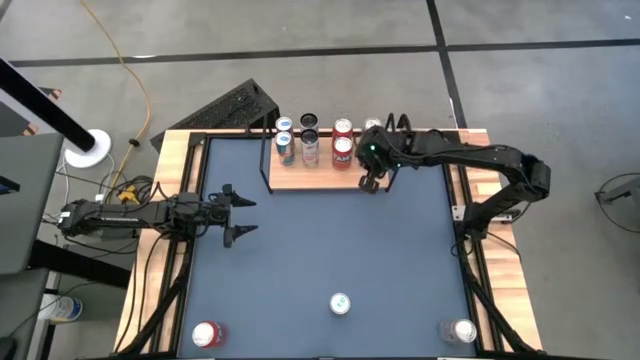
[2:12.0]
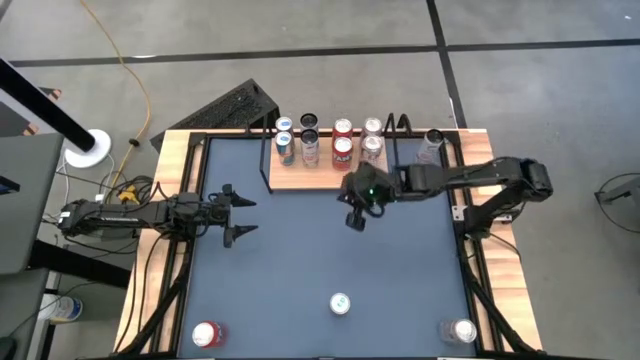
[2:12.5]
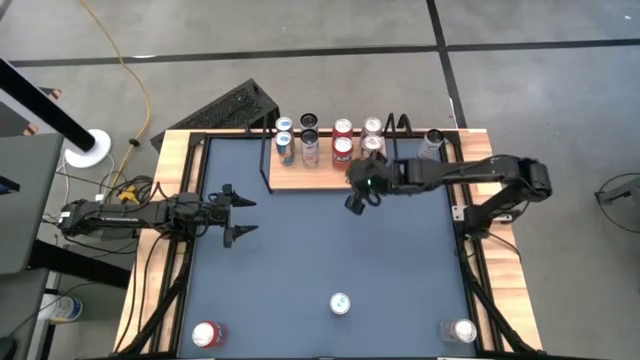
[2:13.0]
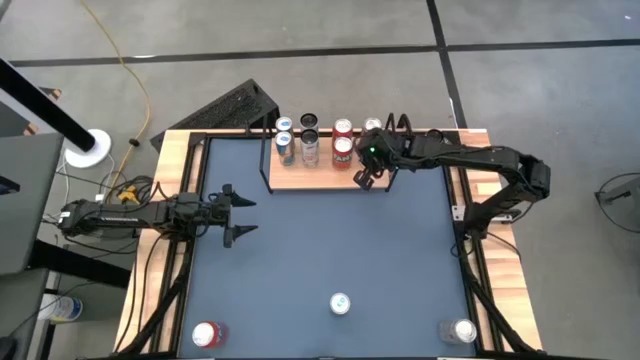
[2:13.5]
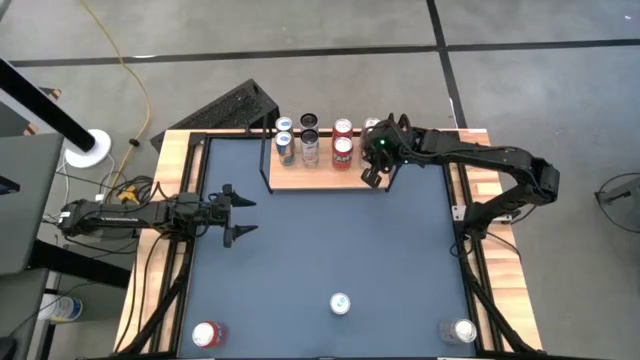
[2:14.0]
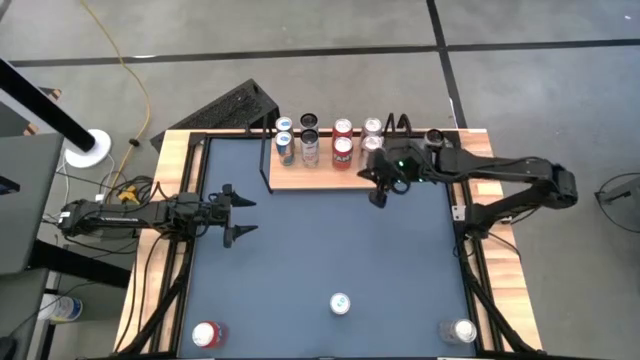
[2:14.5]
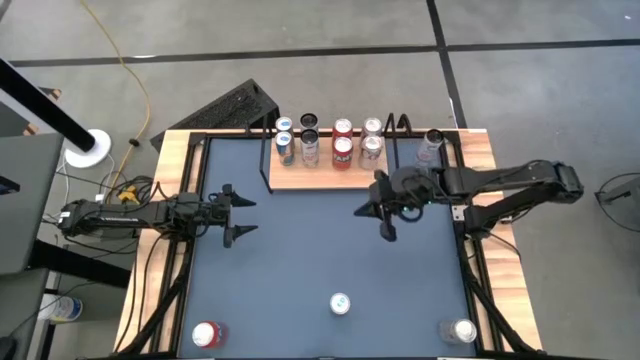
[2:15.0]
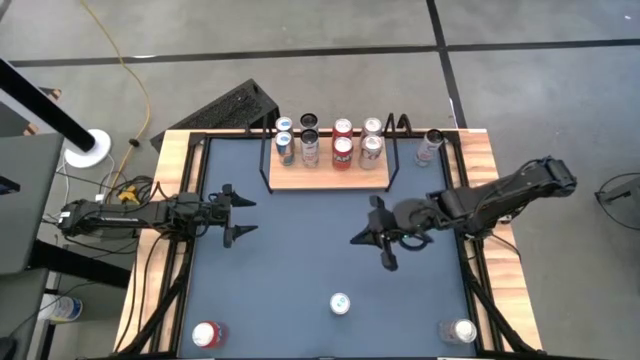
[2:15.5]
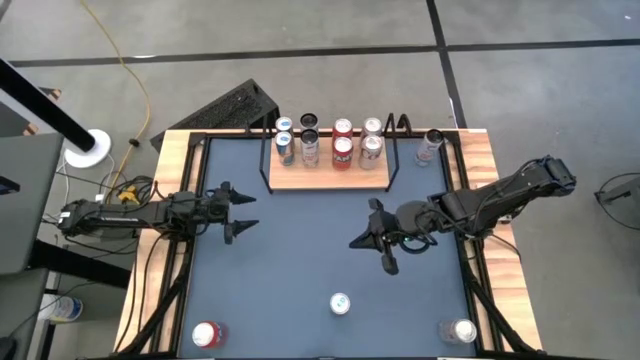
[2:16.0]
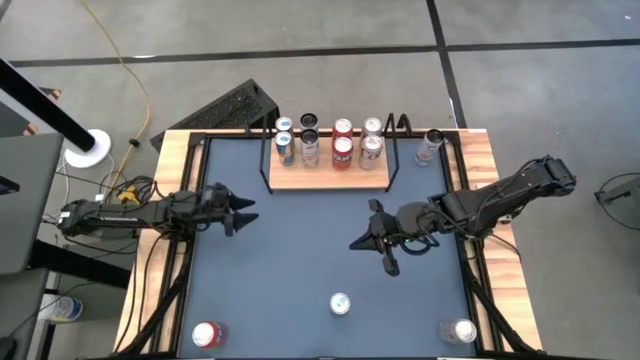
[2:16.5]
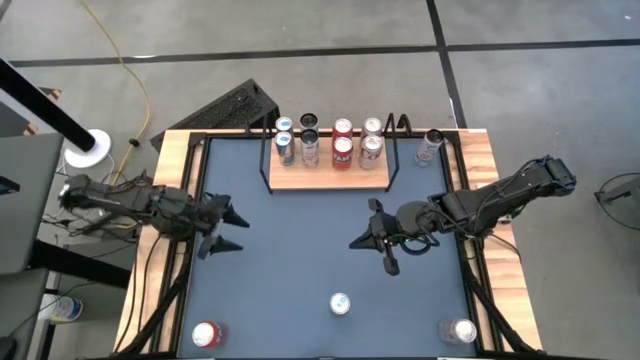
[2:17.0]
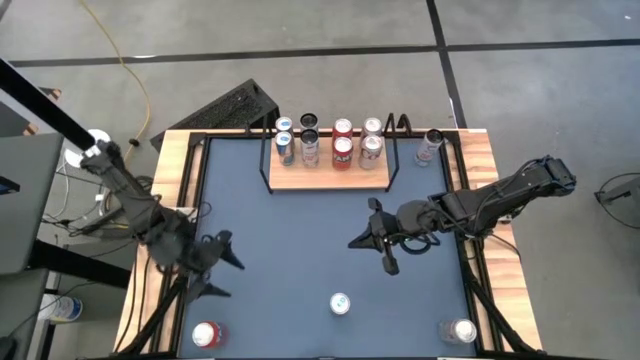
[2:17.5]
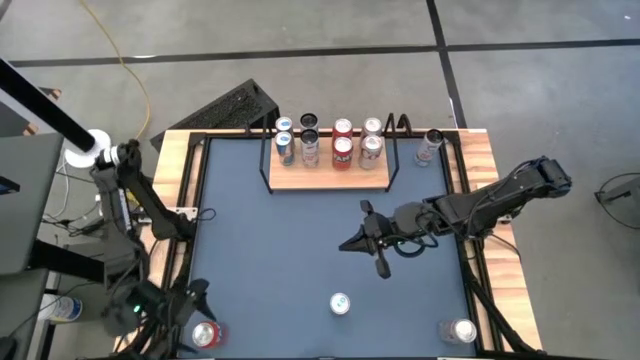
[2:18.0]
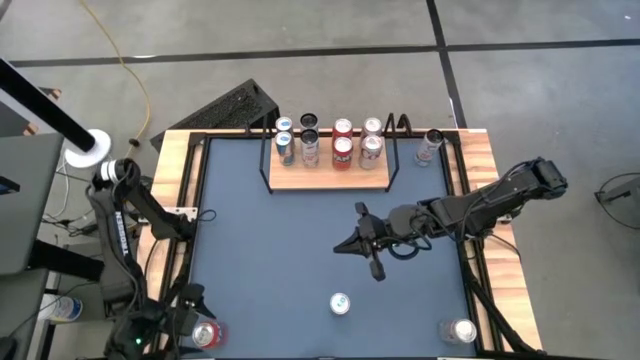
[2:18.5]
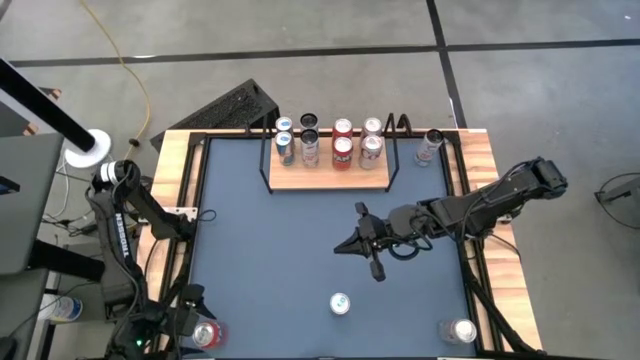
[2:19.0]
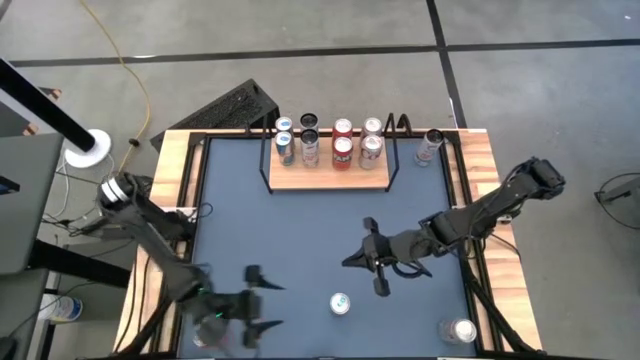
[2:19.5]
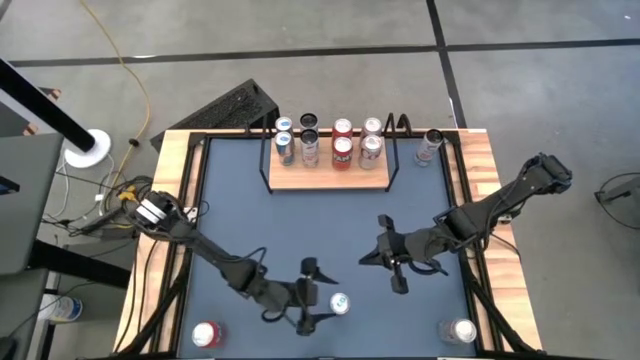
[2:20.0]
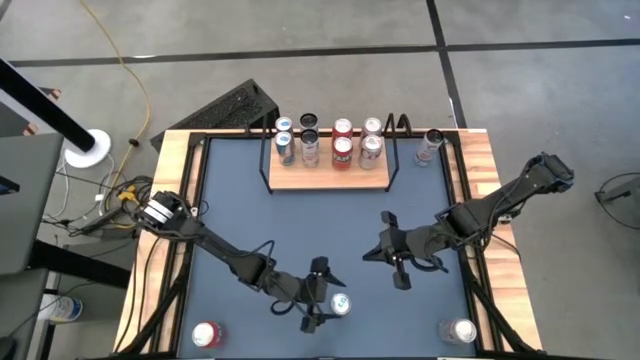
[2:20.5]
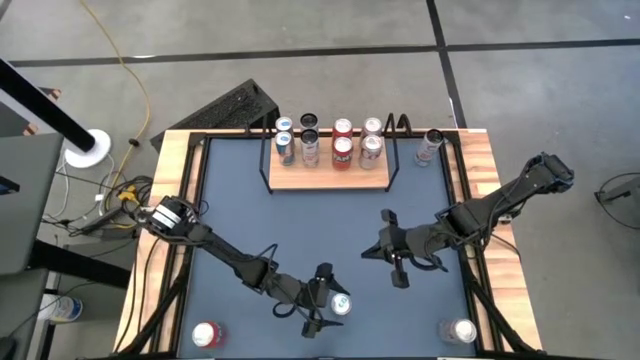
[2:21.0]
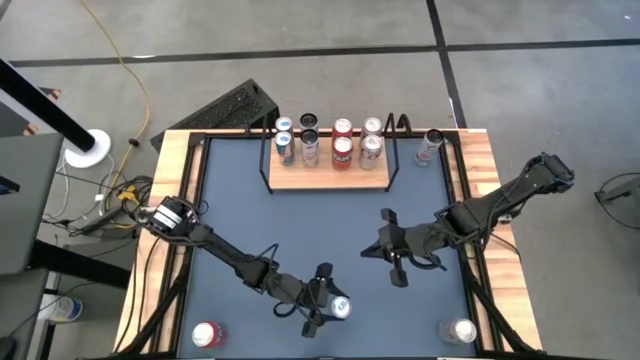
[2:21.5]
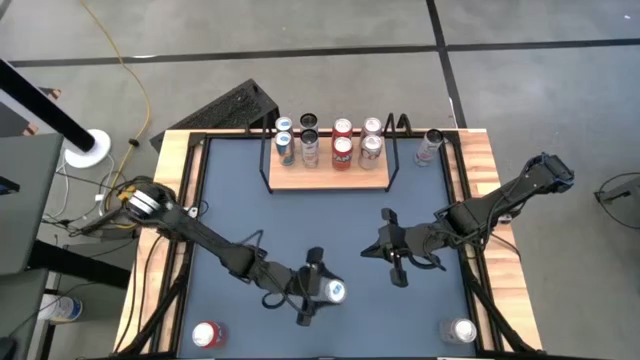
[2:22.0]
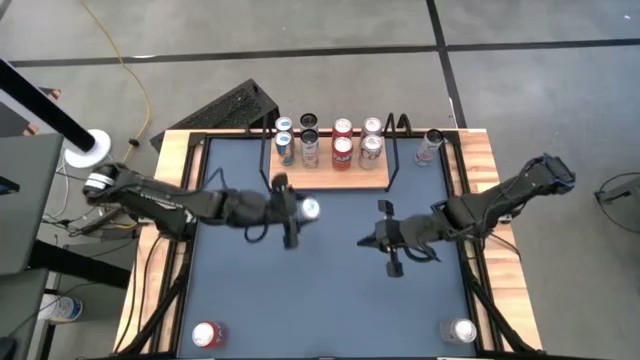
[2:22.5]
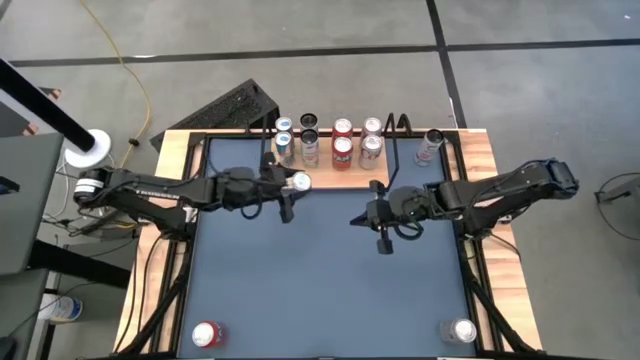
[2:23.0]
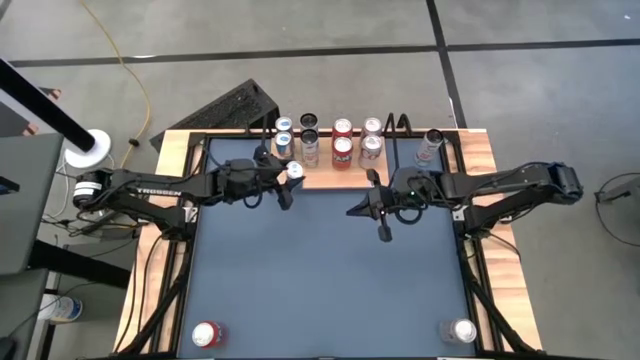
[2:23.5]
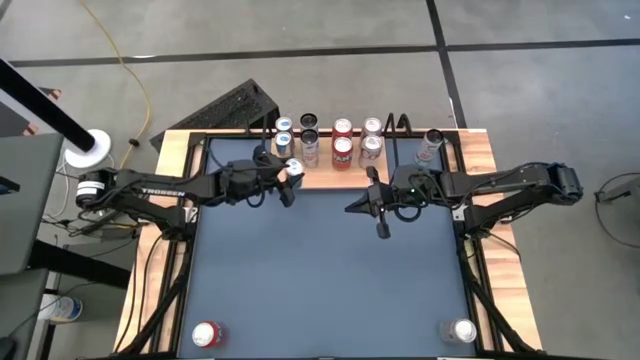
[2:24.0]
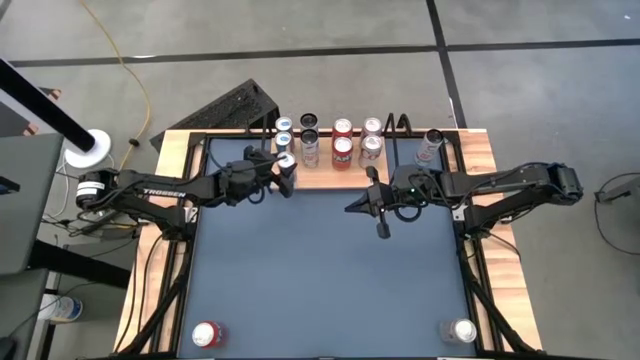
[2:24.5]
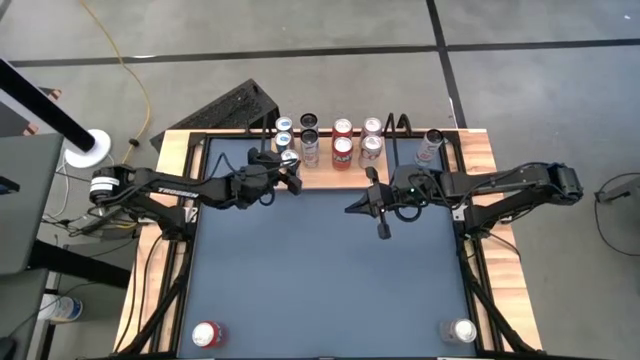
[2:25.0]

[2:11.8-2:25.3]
Task: Place canned beverage on shelf
Put the blue soda can on the shelf aligned with the other blue soda cans

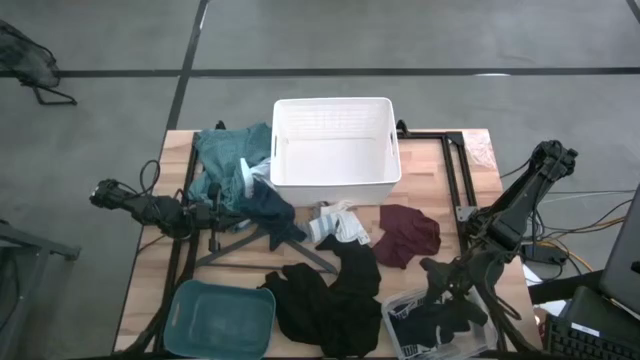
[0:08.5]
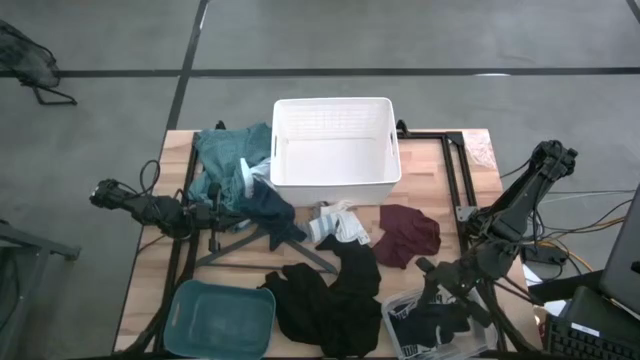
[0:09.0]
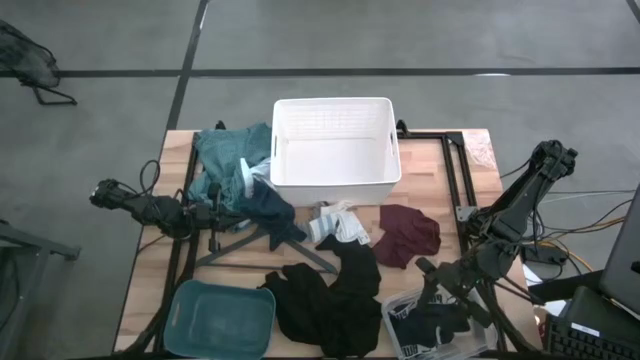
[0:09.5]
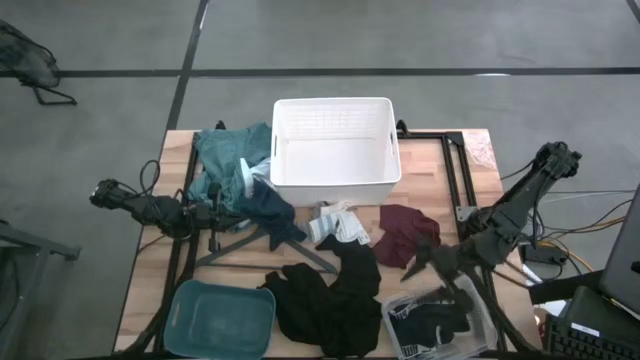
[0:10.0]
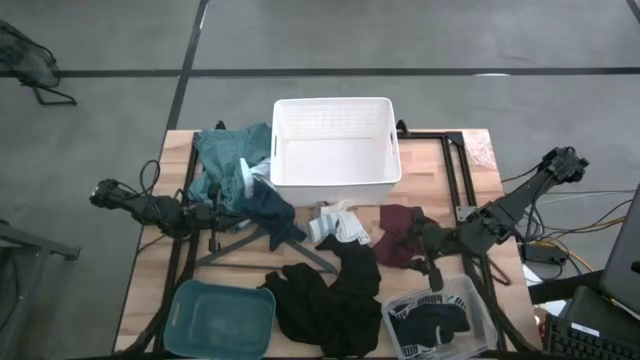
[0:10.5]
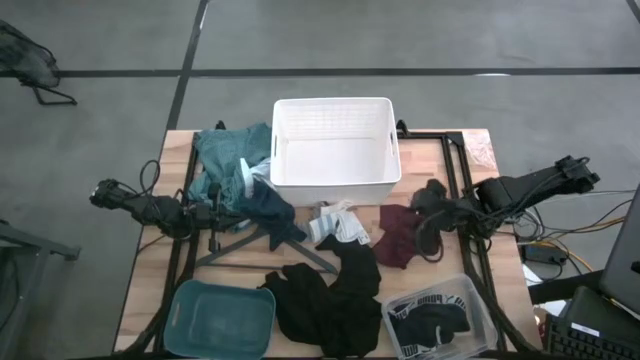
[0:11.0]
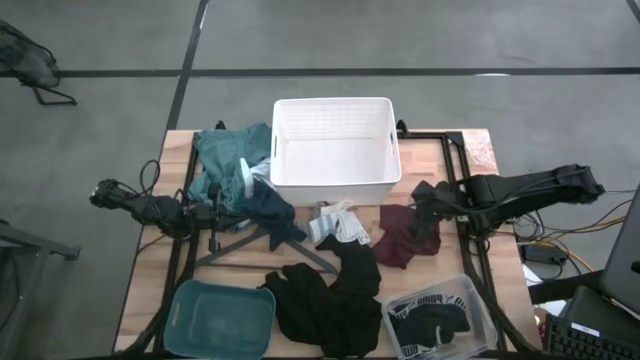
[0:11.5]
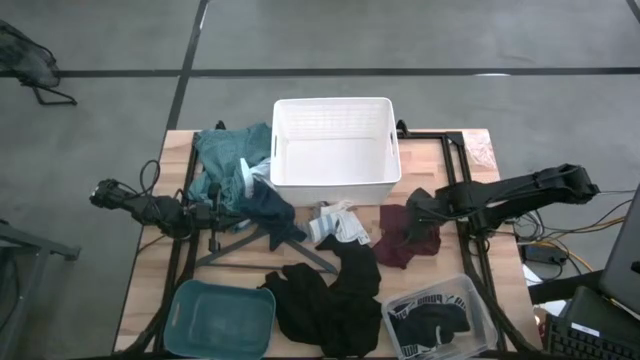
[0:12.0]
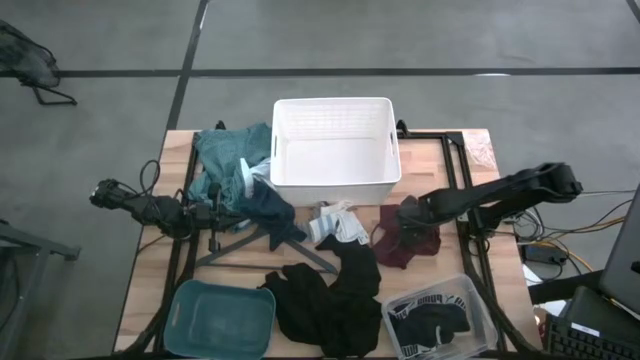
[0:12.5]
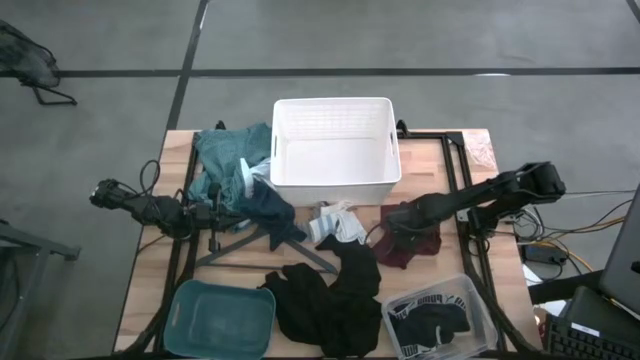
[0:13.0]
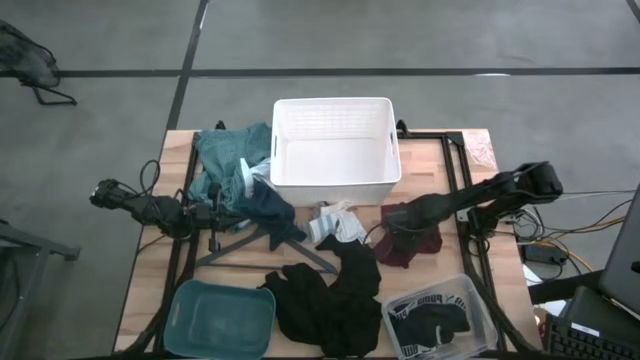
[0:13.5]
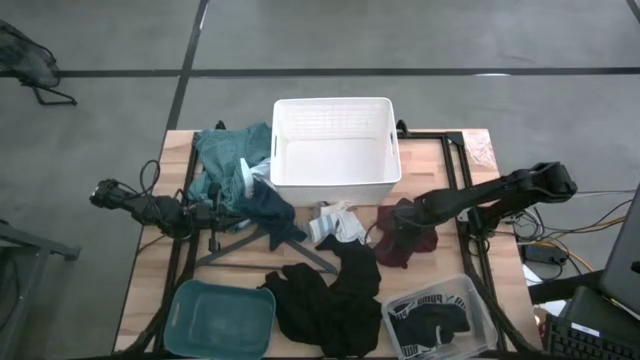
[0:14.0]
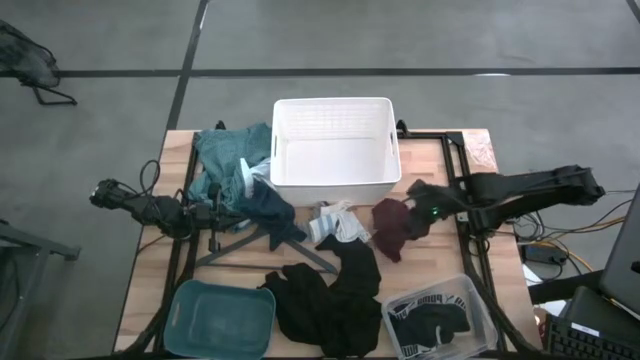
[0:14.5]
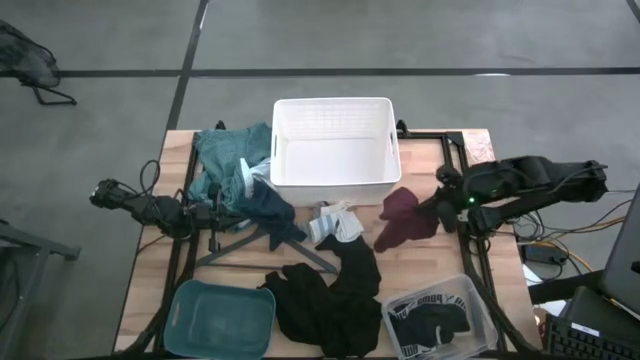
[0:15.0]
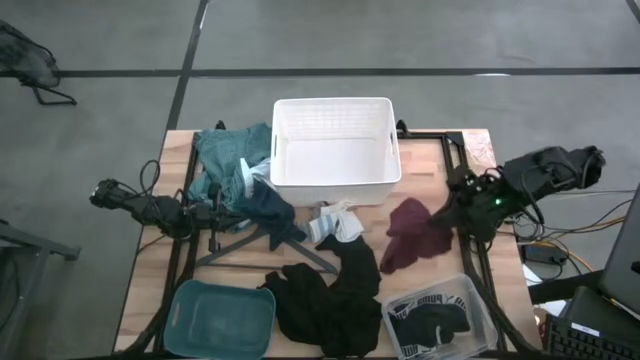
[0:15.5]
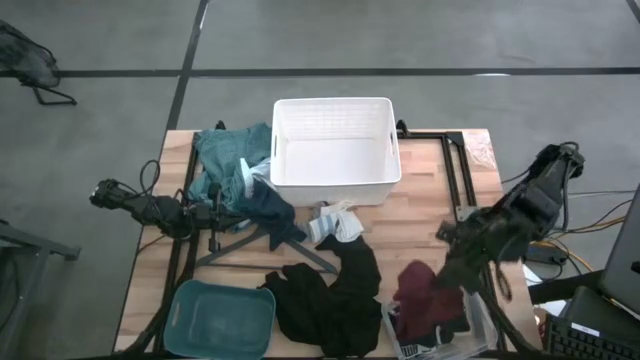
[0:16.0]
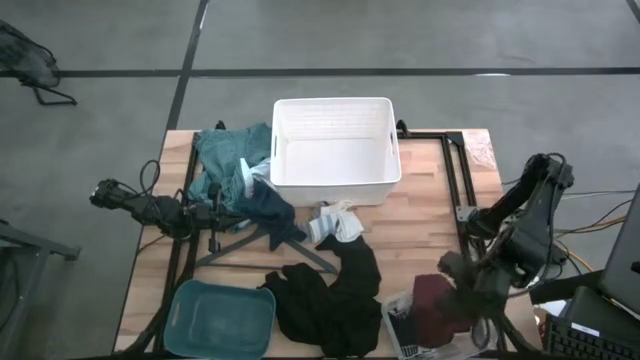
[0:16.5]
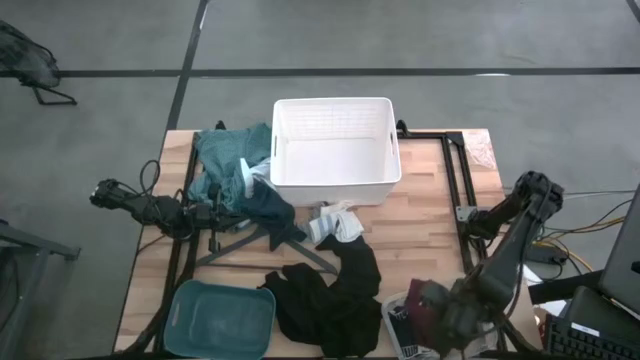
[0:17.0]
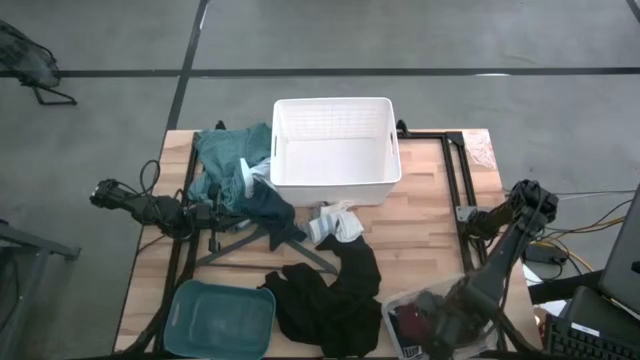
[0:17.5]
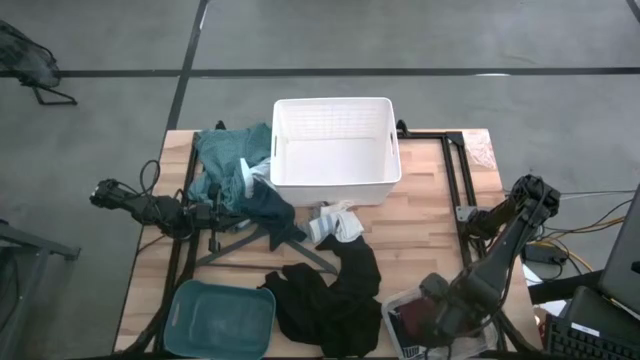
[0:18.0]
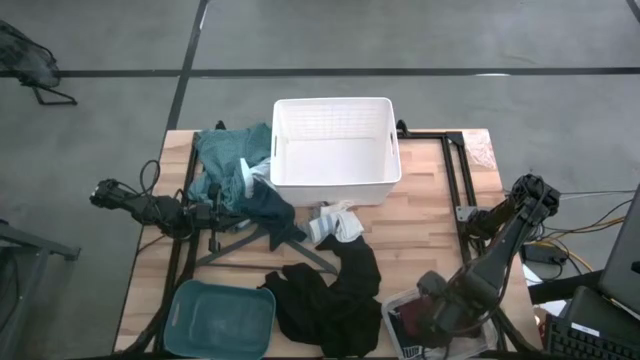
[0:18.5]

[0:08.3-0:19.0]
Task: Pick & Place Cloths
Put the red underwear into the transparent bin
